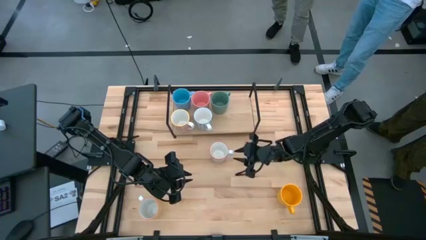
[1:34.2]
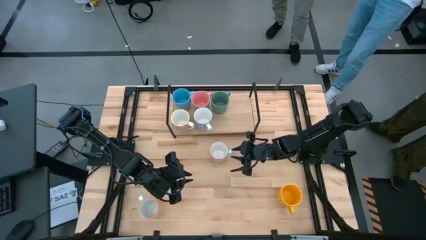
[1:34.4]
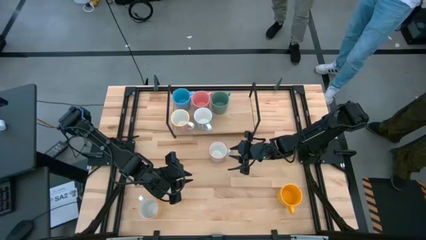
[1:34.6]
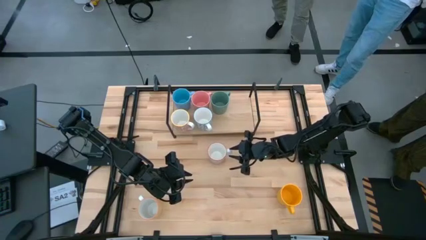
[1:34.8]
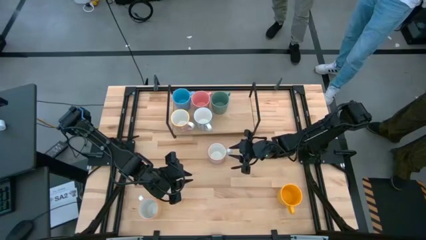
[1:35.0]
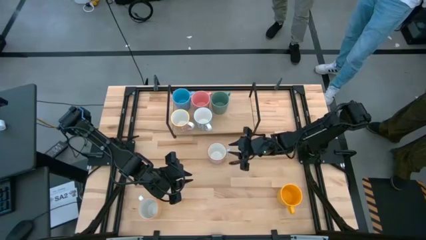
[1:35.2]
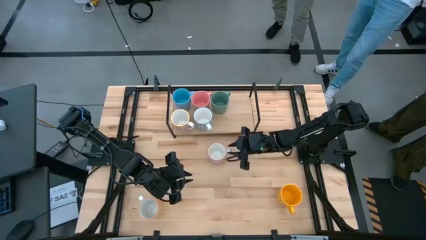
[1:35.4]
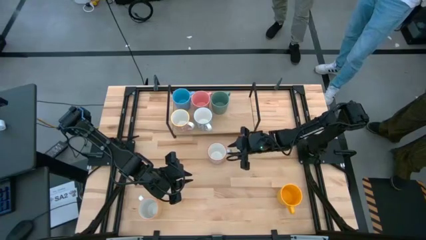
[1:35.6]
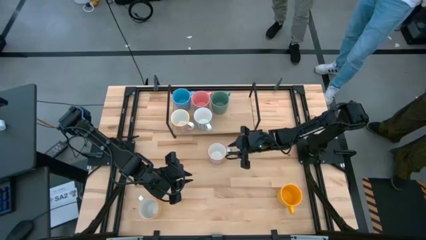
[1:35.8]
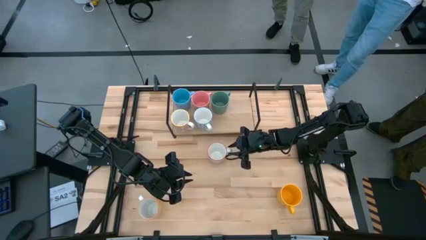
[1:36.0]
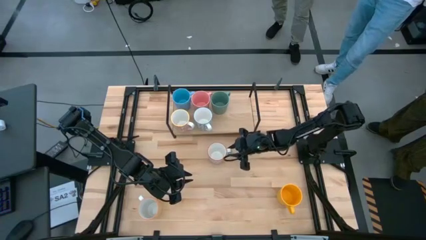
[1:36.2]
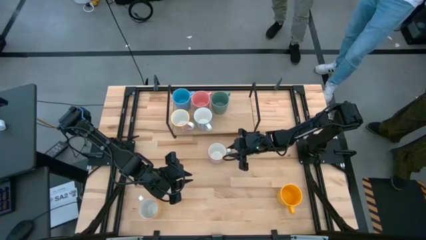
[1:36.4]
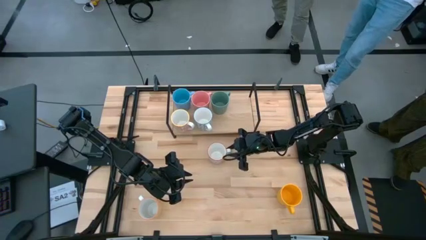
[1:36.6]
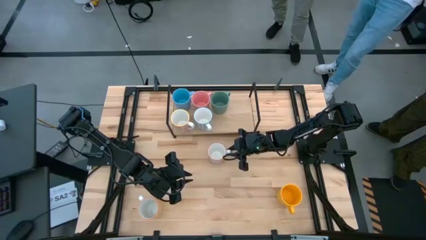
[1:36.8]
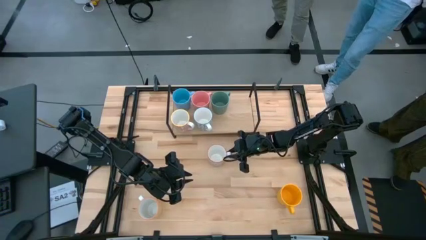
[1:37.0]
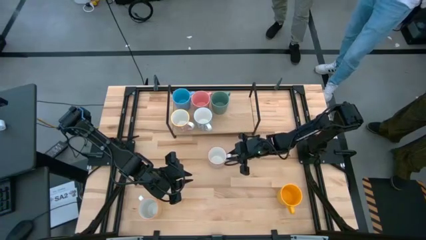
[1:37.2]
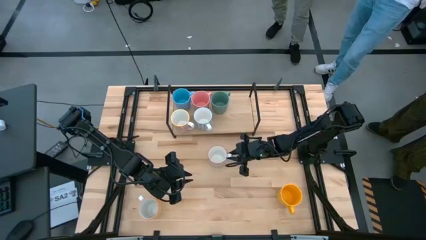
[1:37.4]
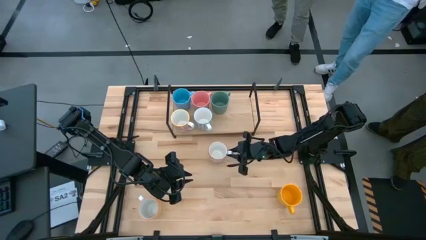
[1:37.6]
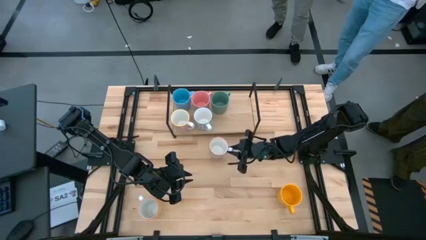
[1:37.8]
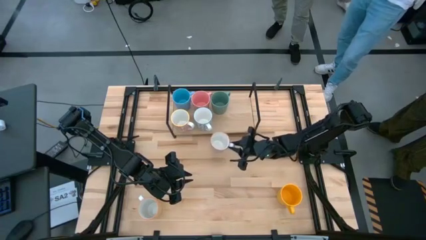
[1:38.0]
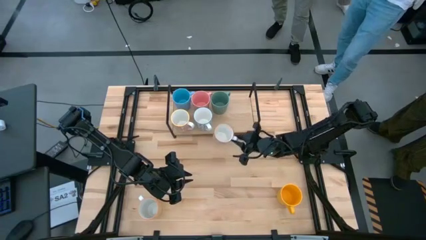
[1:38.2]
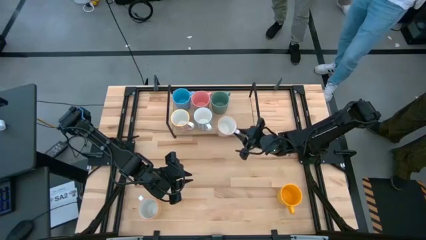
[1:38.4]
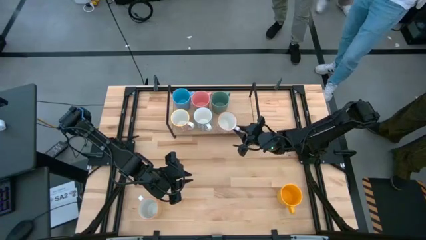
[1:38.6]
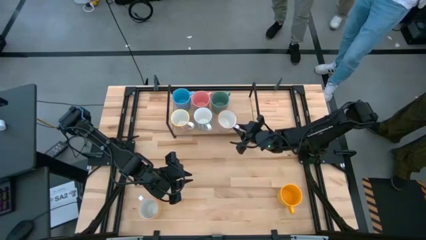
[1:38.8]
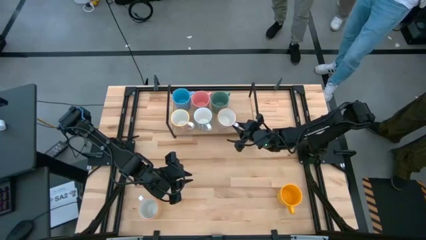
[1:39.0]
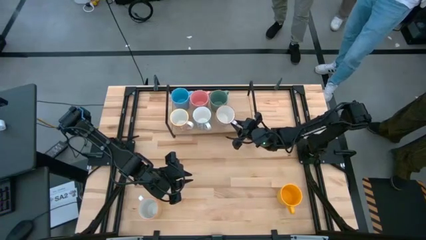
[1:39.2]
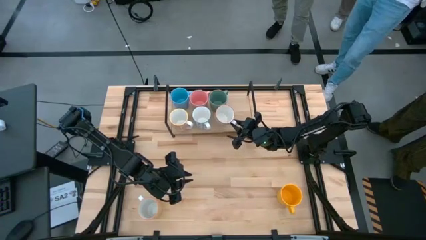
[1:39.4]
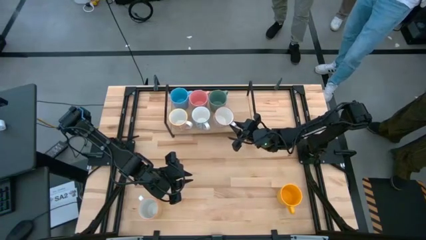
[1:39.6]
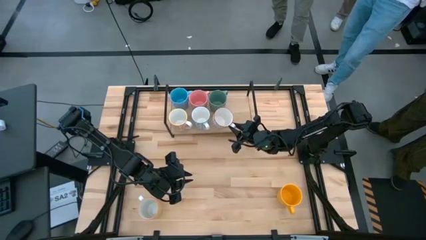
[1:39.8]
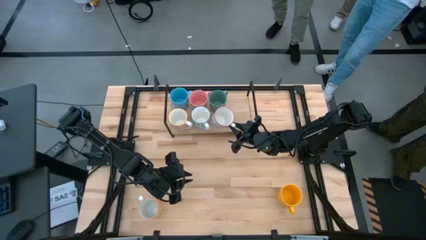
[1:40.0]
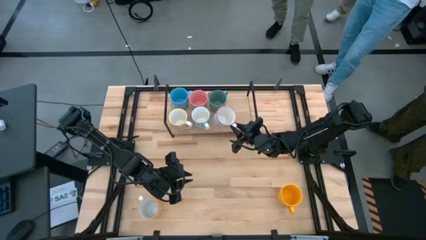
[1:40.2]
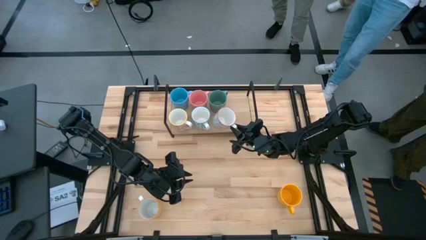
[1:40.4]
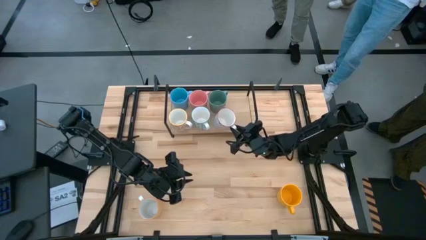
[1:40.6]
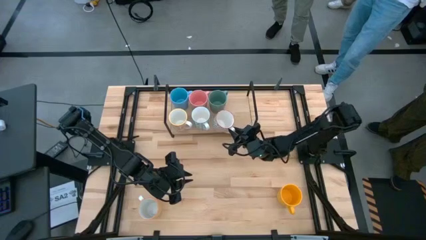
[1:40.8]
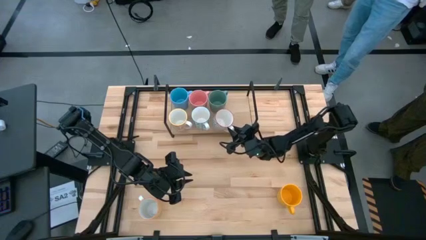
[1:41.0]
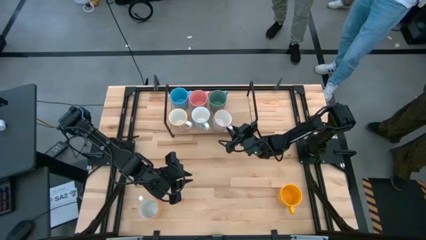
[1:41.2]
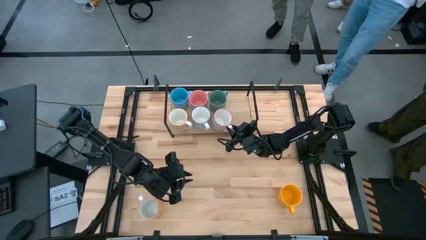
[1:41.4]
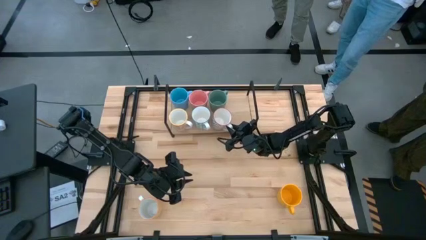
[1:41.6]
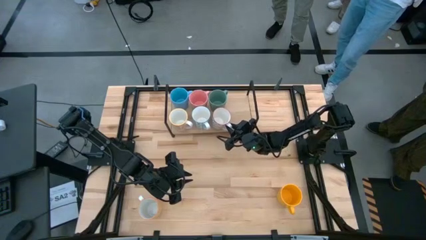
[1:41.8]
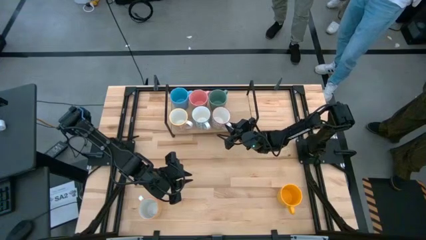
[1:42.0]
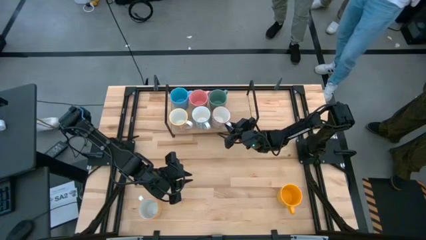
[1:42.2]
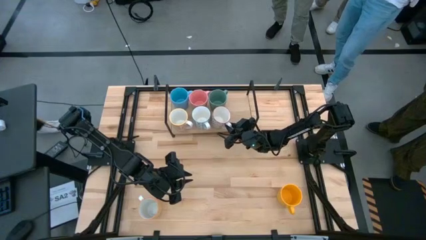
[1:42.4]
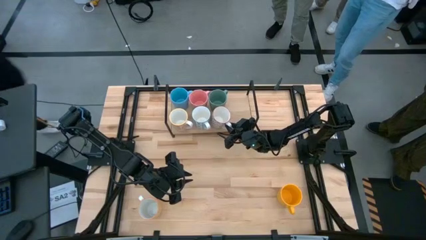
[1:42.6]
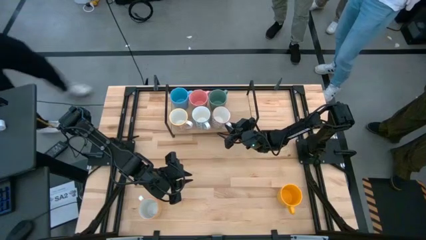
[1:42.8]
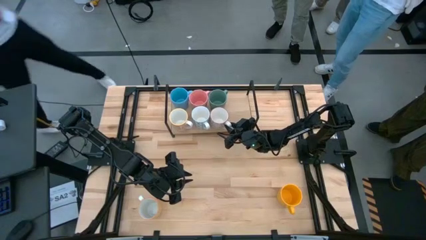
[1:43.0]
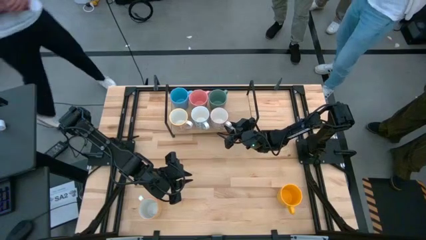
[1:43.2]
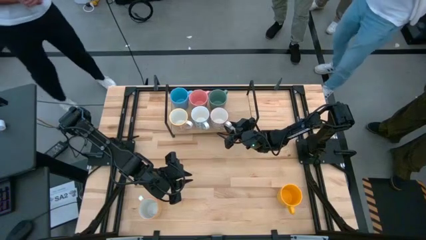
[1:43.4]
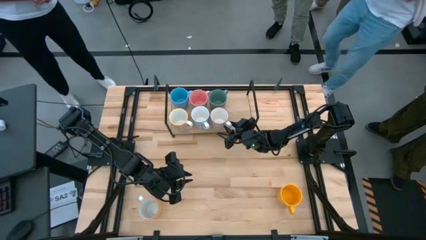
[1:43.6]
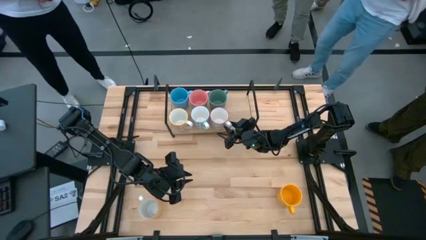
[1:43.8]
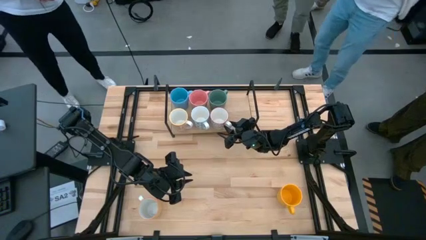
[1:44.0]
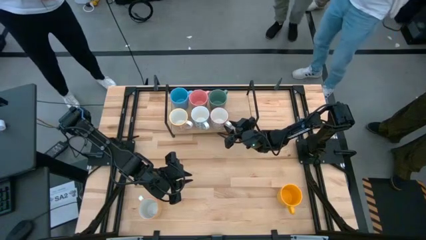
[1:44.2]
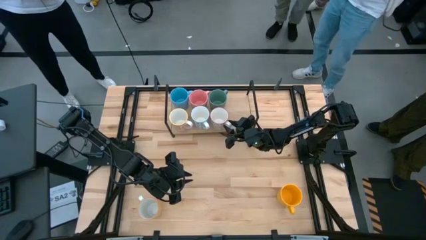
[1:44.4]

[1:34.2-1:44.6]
Task: Place coffee mugs
Put the gray patterned mug on the shelf
